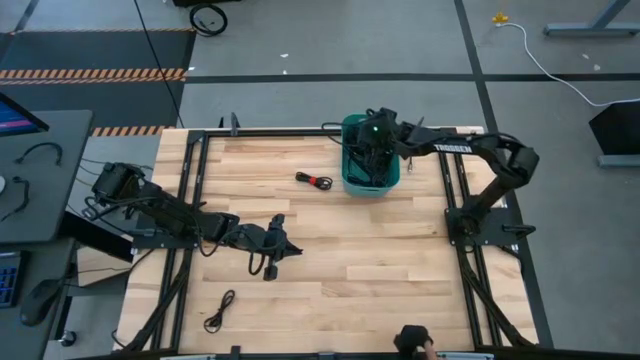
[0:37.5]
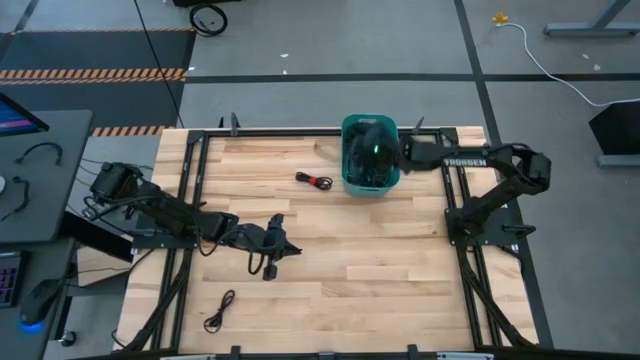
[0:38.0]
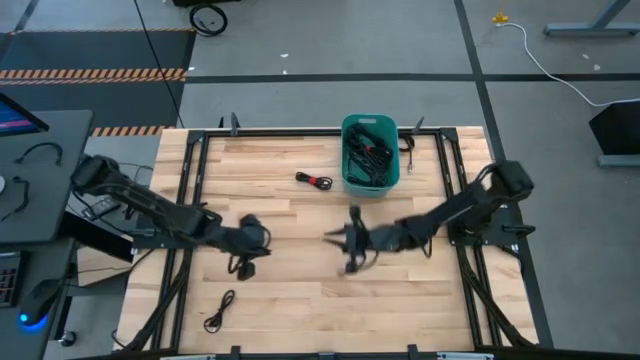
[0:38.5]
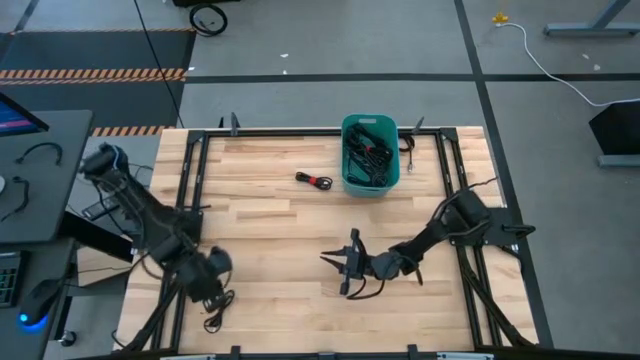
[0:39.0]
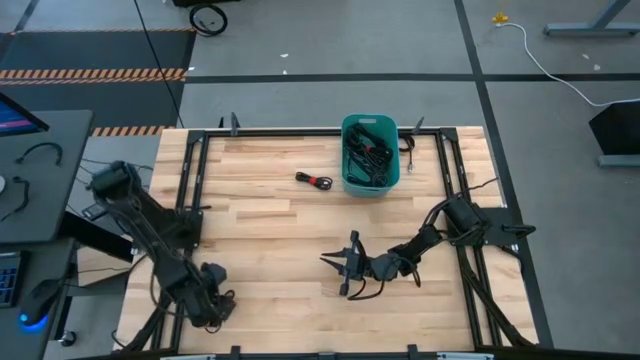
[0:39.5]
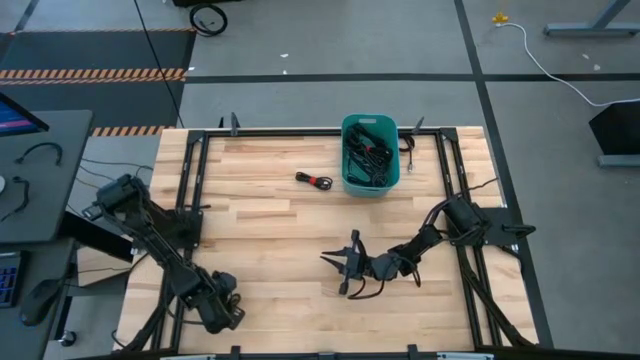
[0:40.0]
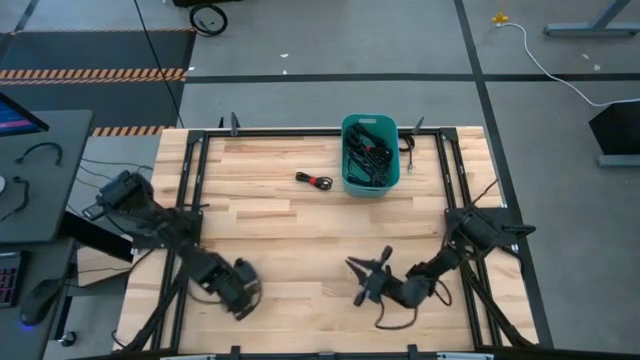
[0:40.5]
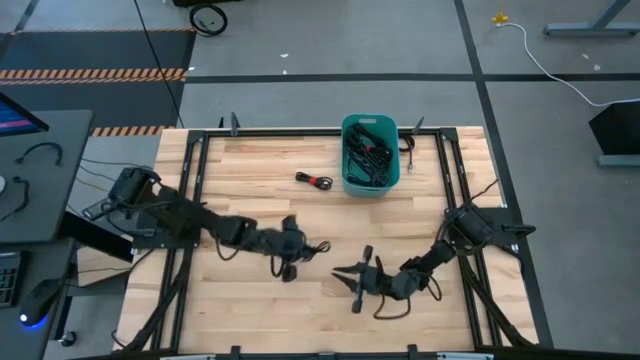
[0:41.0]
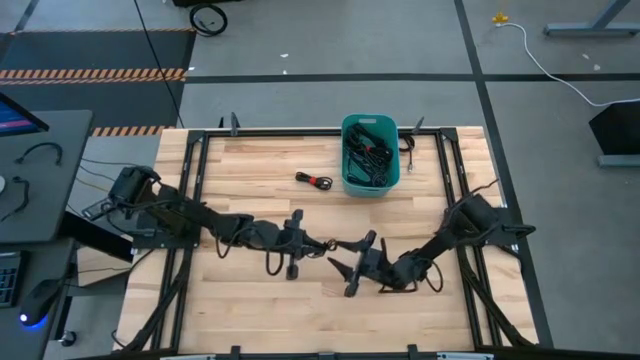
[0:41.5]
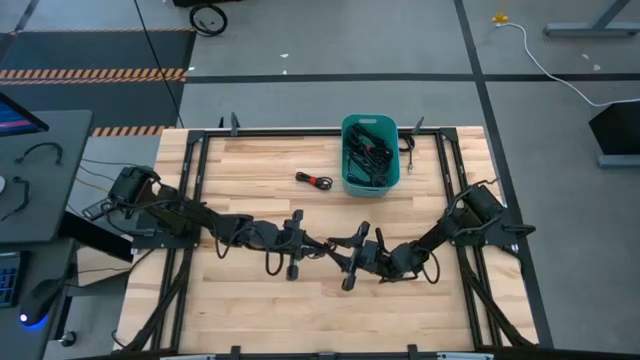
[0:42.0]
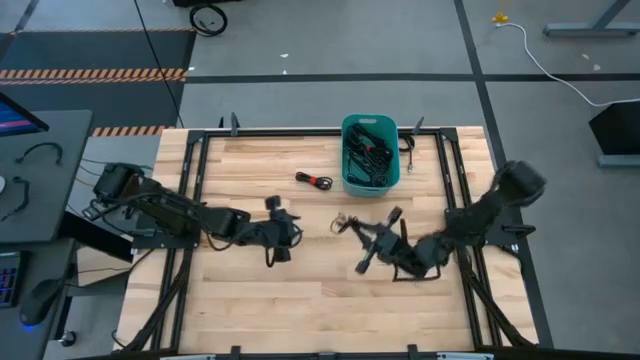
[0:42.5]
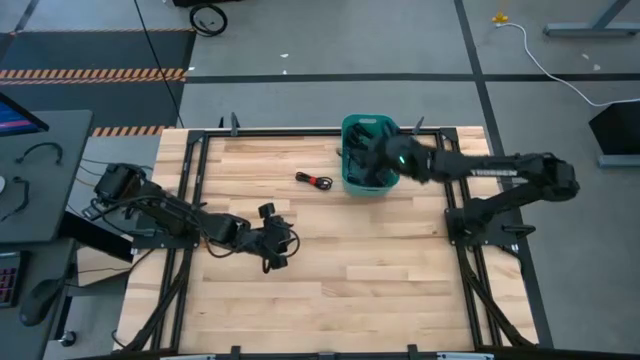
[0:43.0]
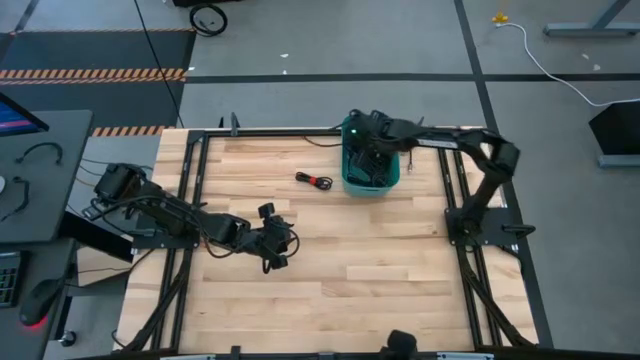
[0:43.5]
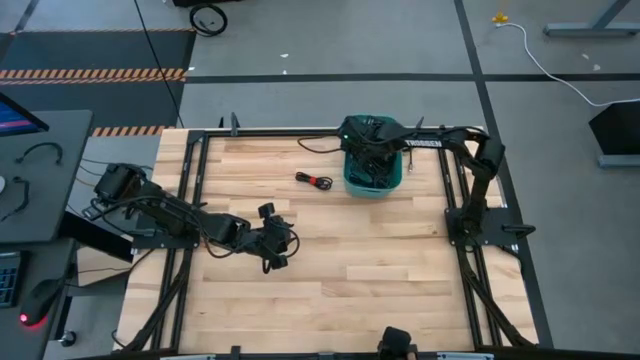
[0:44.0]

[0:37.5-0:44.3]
Task: Pick and place USB-C Cables
Put the black charger cable into the green bin

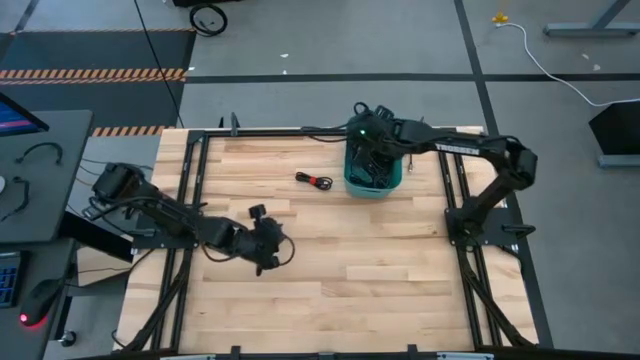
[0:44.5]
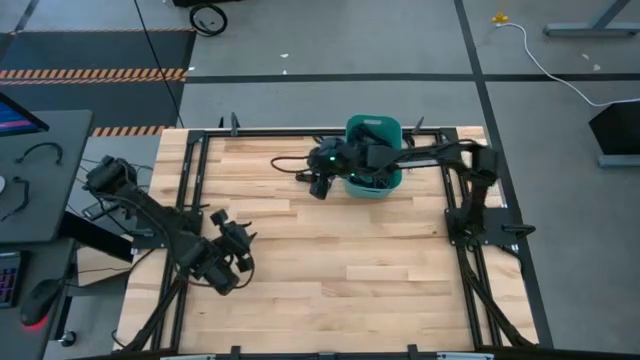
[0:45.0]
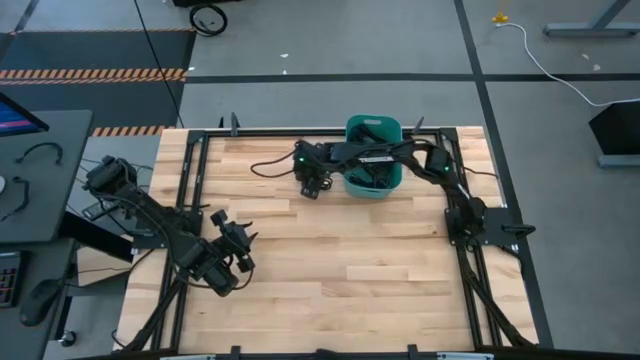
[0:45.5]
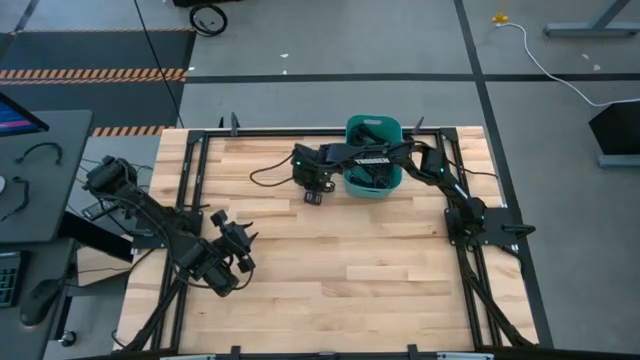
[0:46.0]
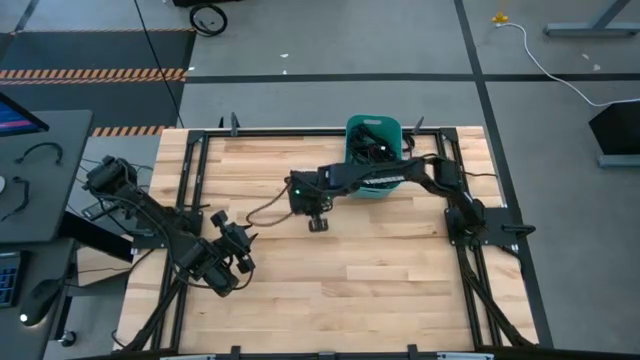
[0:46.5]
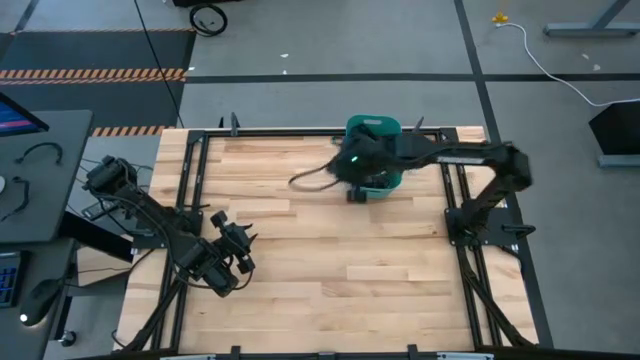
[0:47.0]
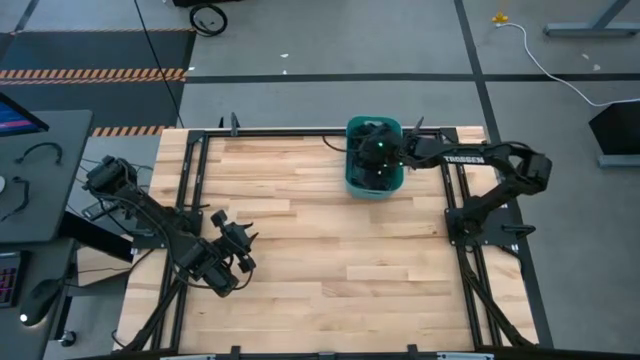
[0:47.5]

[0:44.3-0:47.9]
Put the black charger cable into the green bin

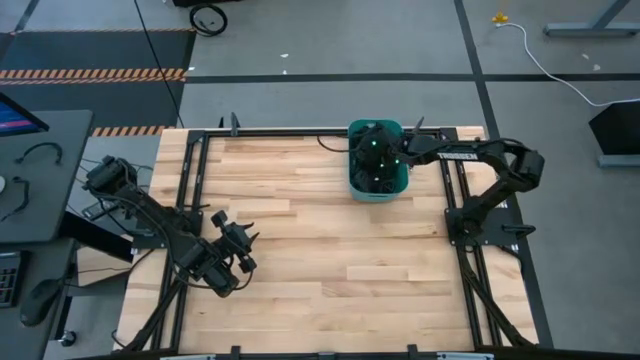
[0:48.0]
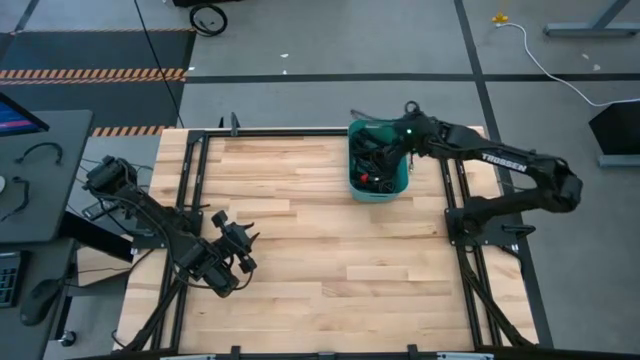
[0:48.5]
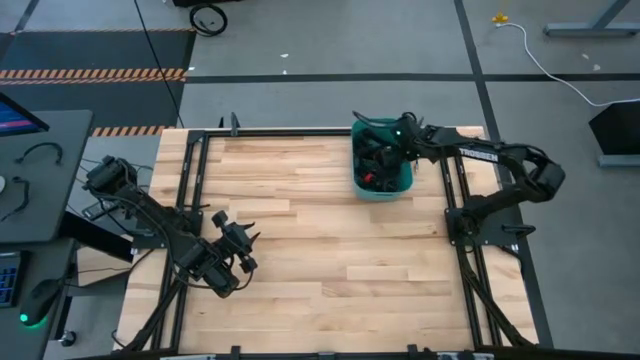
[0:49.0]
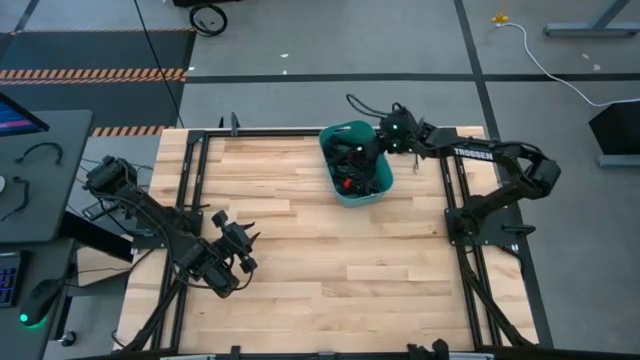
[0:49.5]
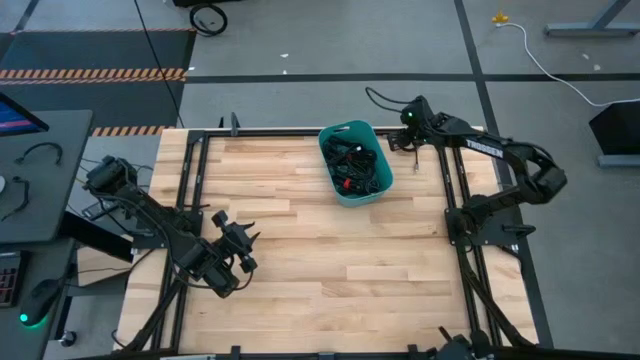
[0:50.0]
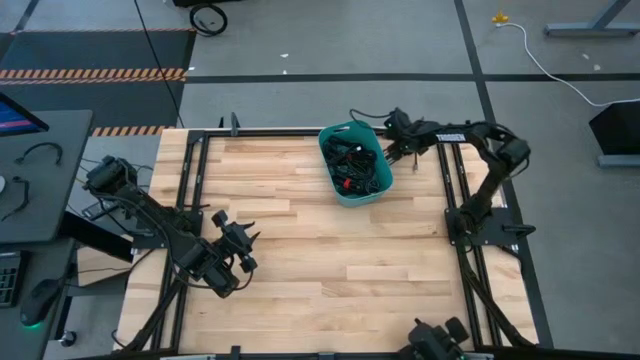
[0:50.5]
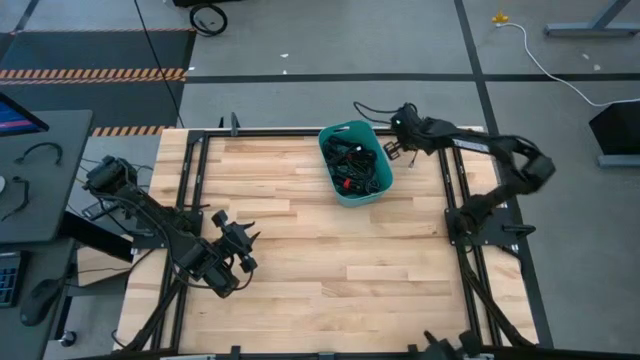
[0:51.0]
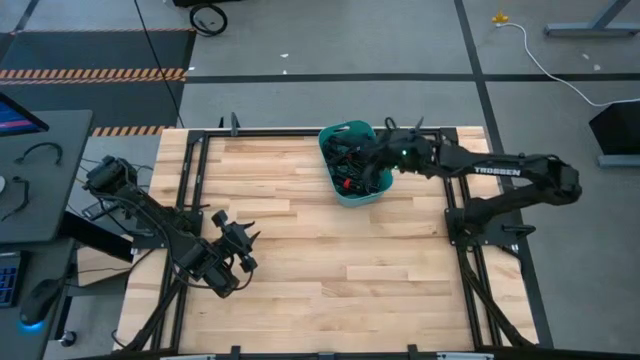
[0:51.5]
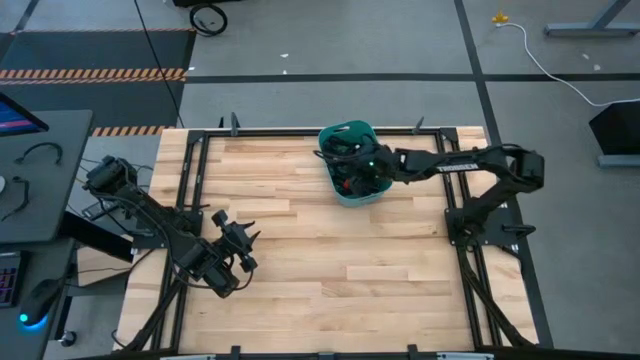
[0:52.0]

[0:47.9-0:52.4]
Put the black charger cable into the green bin

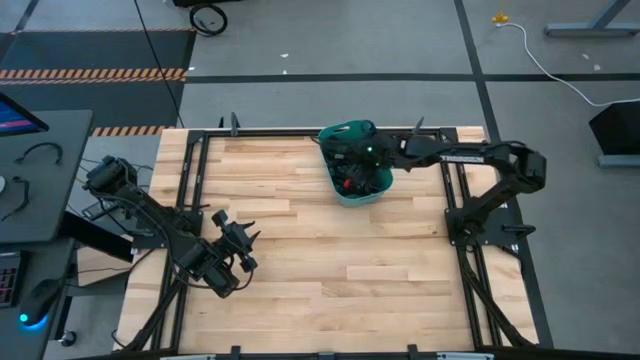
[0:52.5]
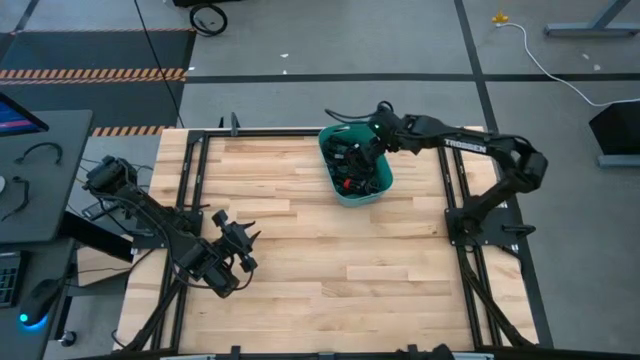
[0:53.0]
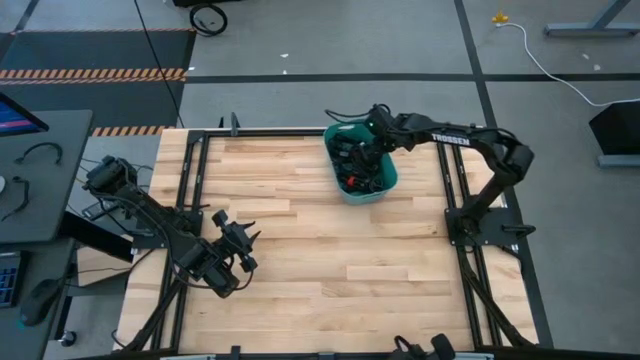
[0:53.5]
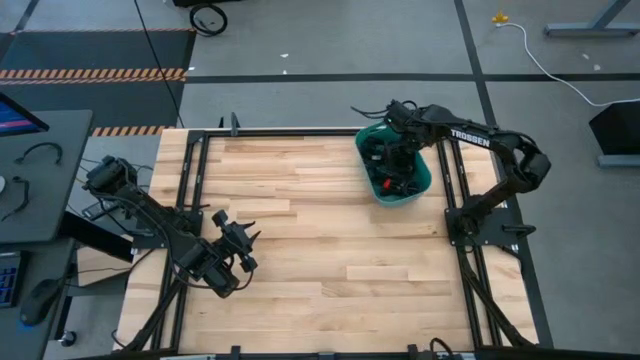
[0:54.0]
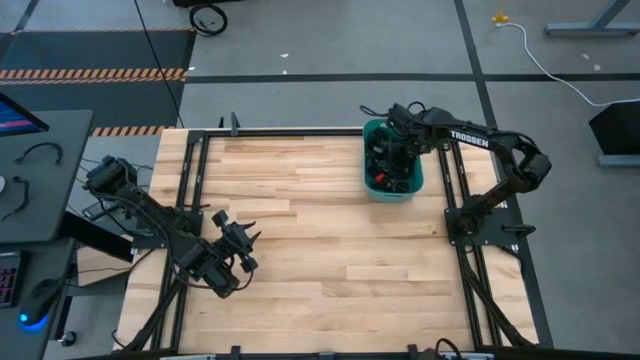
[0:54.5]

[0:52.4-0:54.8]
Adjust the green bin

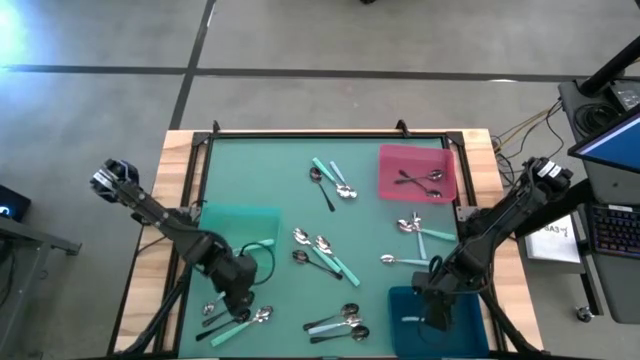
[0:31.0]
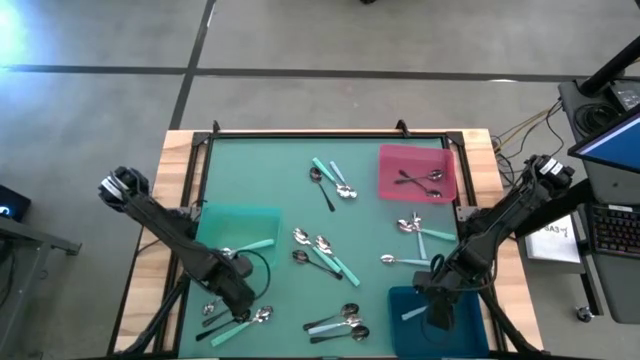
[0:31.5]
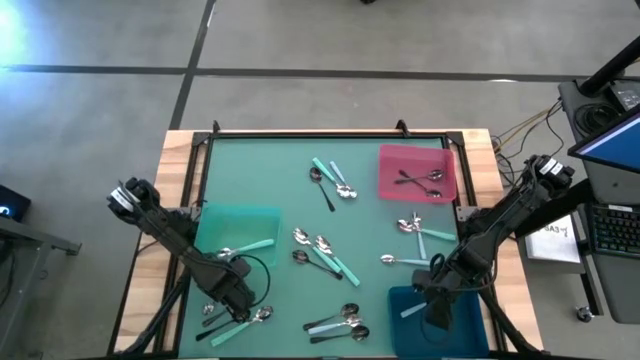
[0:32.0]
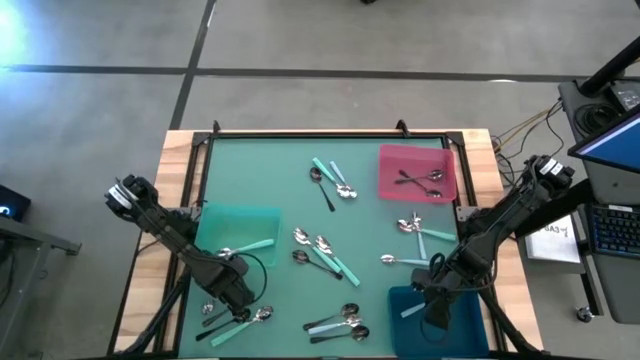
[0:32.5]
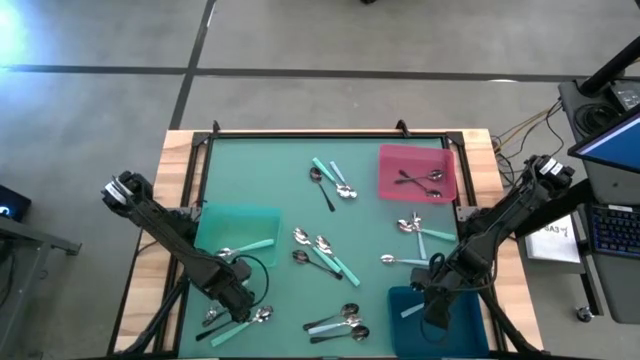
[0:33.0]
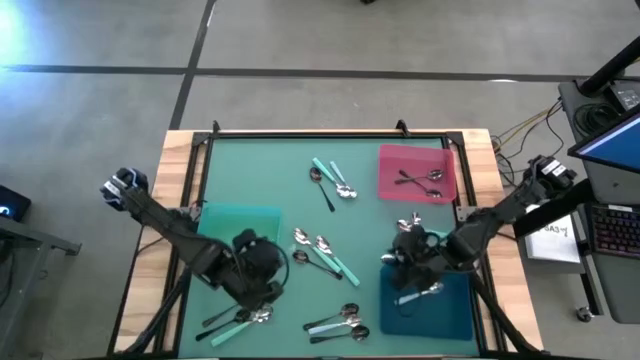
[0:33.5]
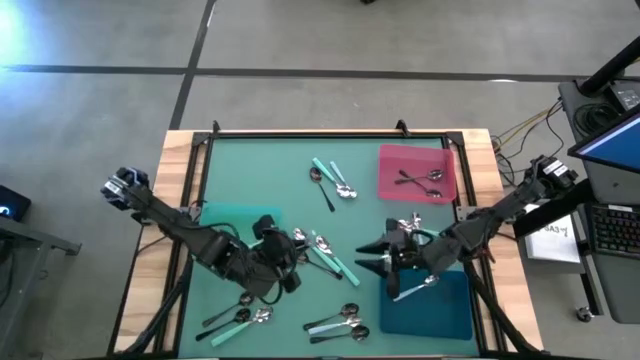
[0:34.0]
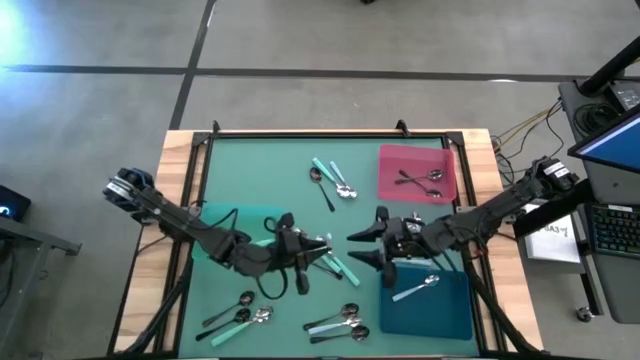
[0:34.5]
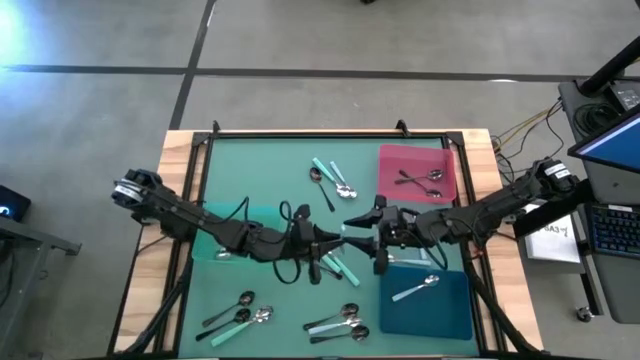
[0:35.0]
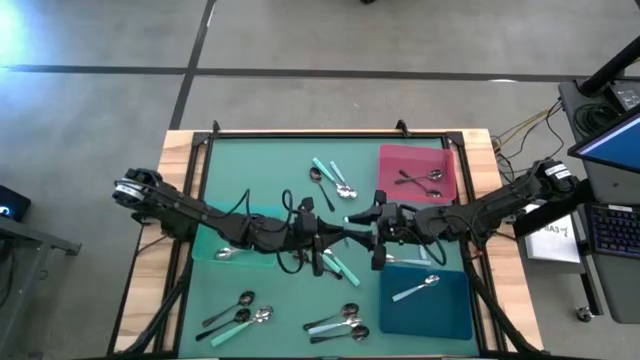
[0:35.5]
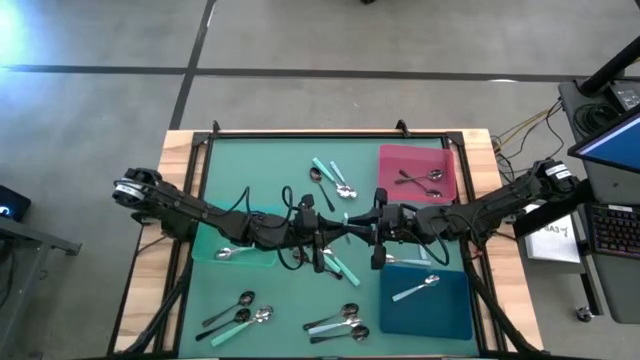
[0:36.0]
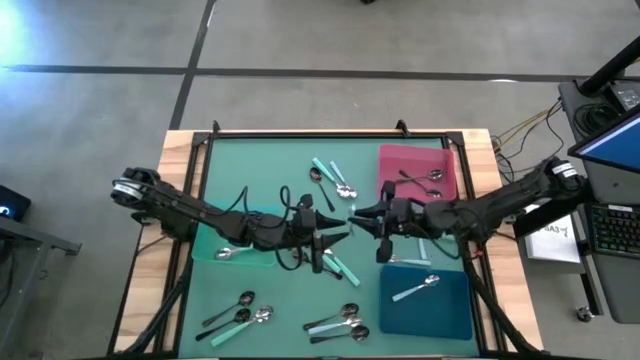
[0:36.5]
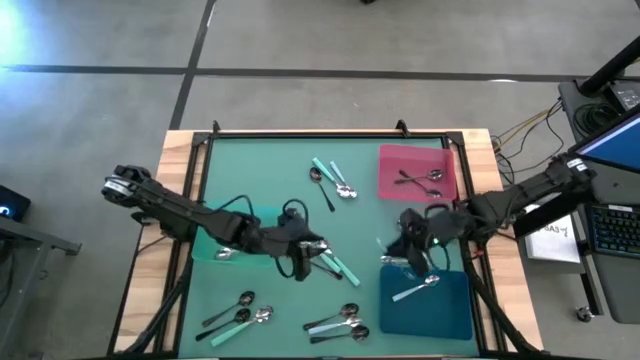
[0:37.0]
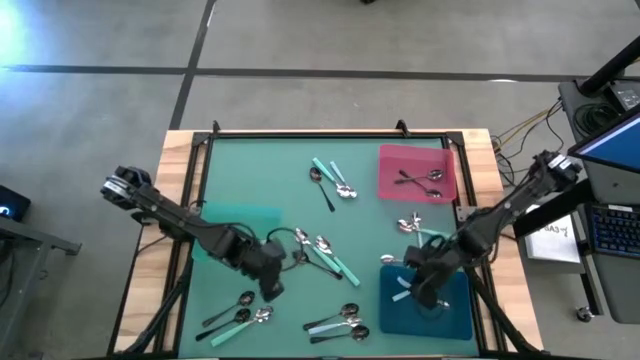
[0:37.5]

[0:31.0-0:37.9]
Task: Sort silverware by color (type)
Put the blue spoon into the blue bin
